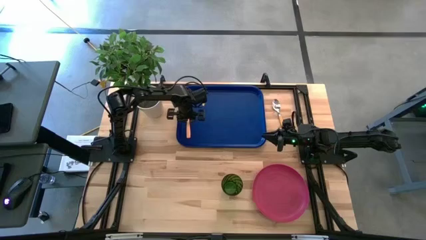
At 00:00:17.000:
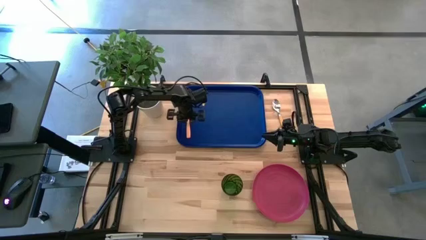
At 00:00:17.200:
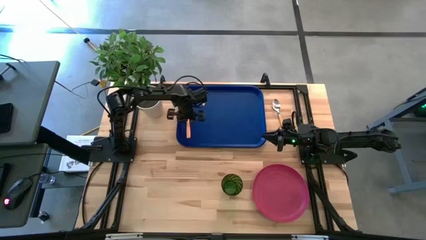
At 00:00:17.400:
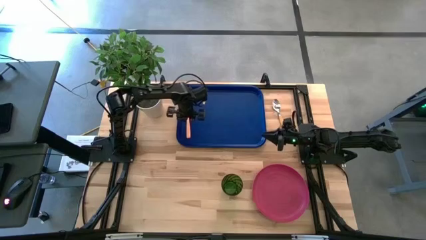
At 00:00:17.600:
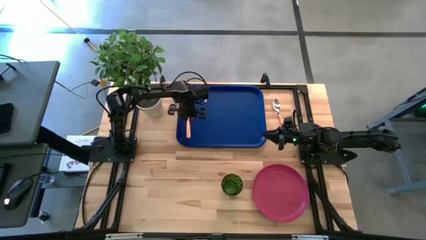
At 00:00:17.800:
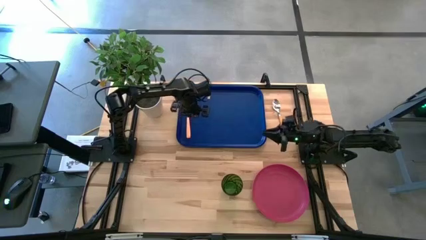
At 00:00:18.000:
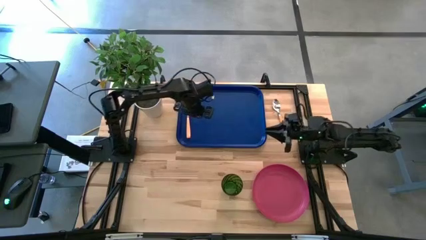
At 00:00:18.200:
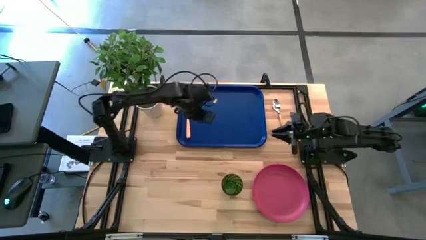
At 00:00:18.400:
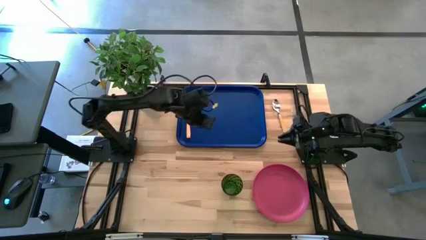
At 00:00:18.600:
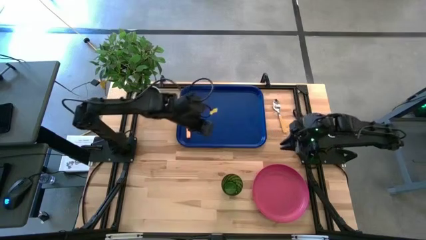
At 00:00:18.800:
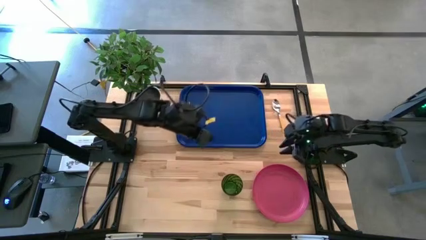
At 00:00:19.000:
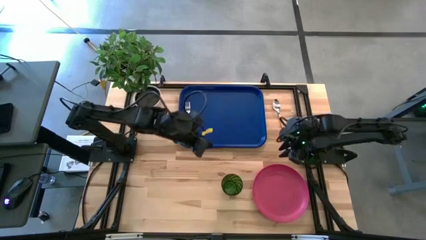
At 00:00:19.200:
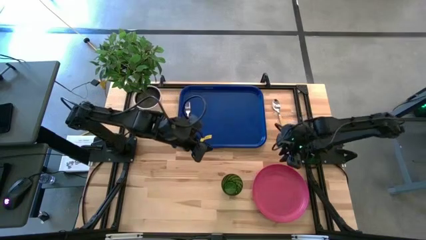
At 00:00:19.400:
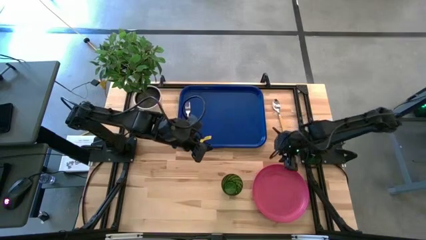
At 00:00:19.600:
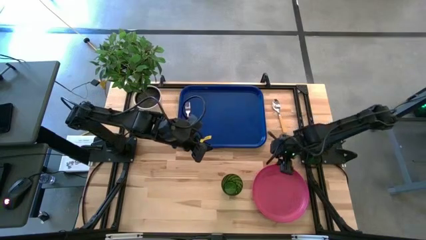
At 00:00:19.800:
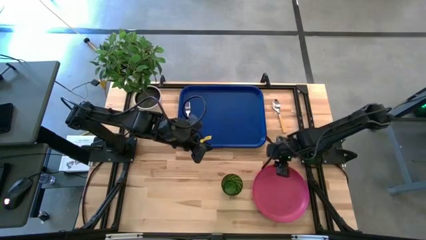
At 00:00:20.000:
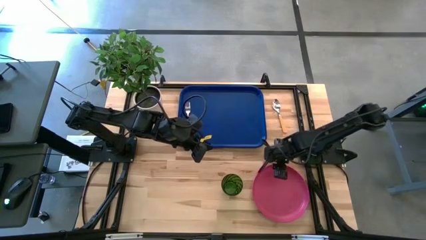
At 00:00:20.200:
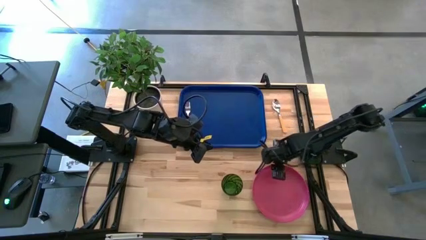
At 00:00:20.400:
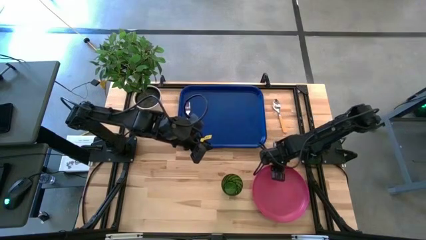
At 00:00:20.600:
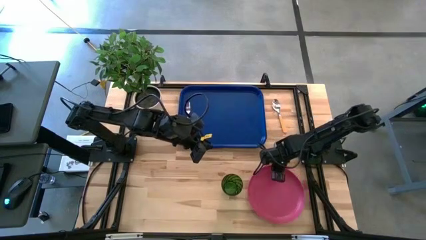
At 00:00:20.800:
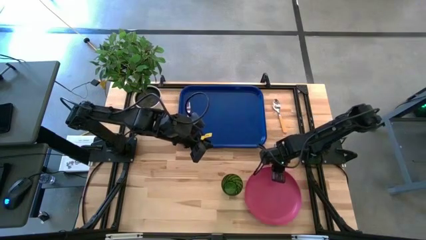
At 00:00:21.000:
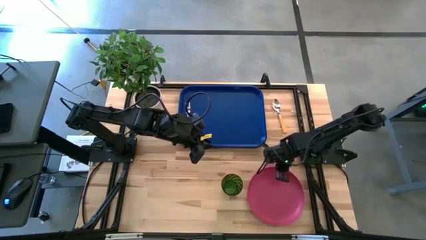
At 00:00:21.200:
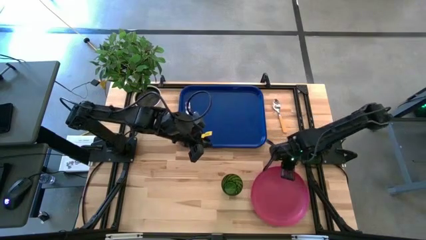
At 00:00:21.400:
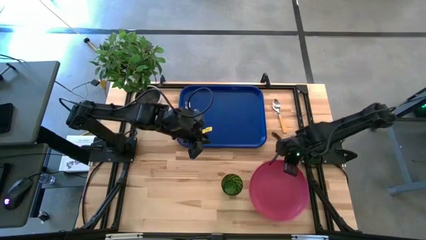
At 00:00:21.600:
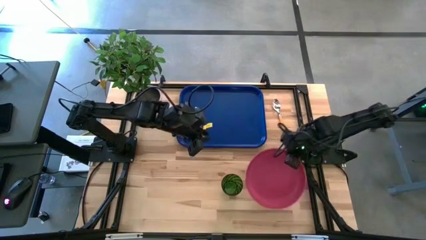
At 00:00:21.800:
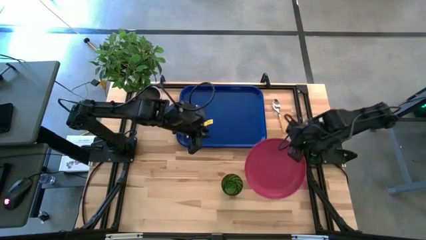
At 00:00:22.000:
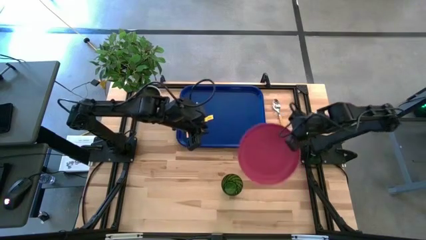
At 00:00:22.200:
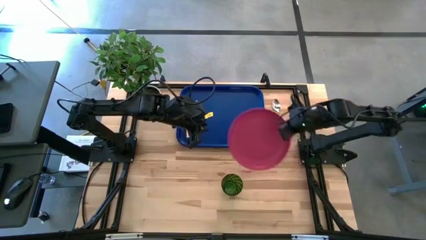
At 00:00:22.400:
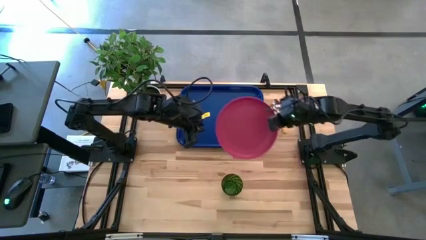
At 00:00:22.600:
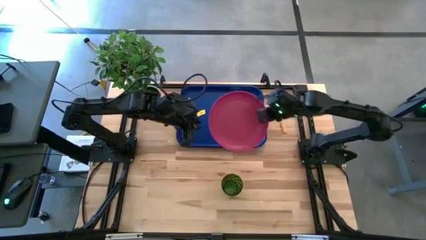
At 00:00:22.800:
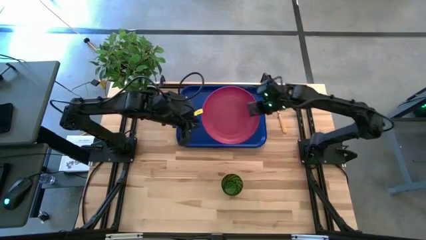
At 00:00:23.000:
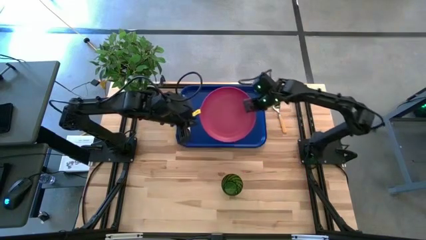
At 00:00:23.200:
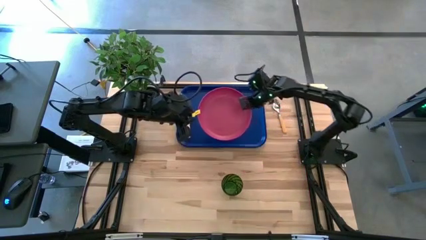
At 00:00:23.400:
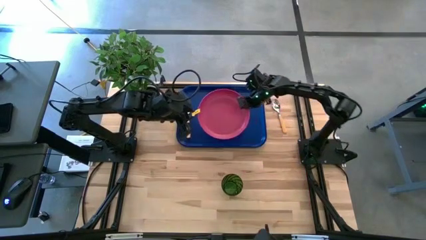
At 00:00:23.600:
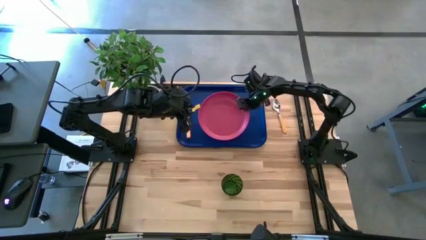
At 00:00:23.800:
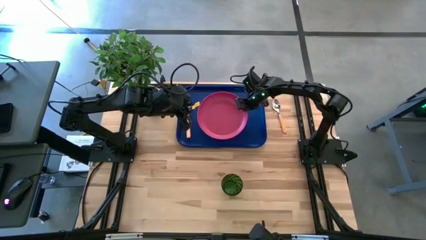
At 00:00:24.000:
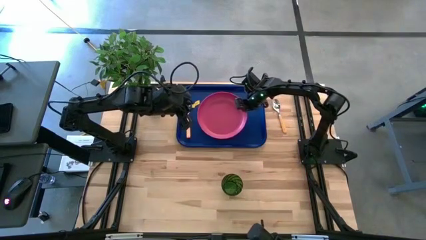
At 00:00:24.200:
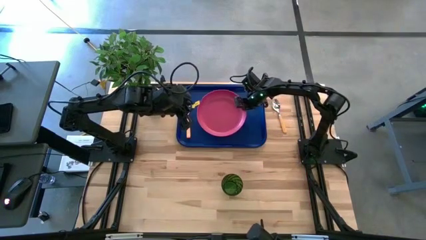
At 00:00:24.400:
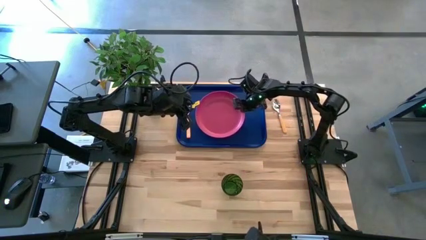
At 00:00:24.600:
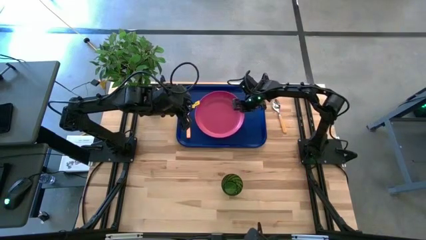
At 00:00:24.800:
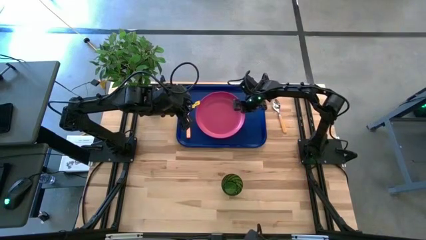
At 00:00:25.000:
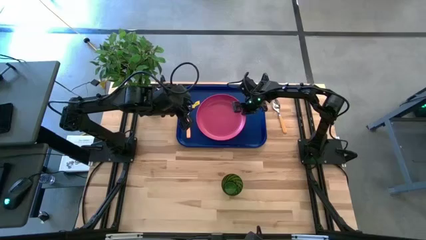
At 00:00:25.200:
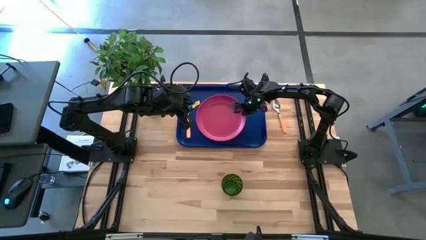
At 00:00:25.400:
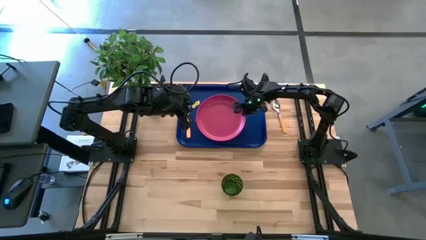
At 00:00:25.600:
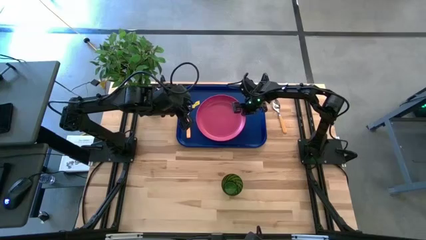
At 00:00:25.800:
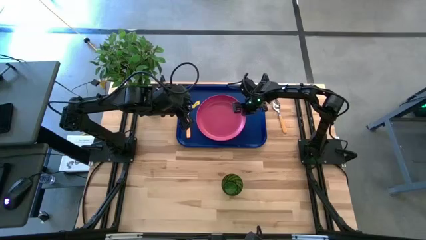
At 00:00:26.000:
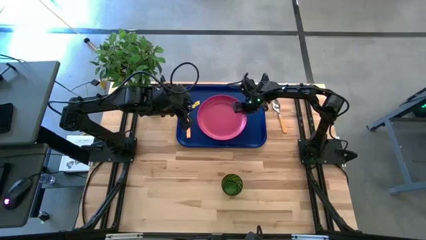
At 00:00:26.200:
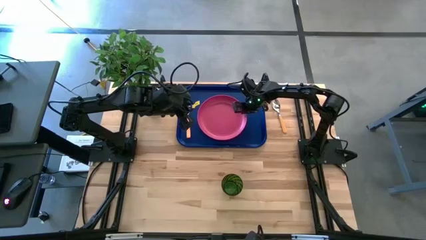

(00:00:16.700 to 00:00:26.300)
Task: Pick and place plate/cup/fork/spoon on tray
Put the pink plate on the blue serving tray

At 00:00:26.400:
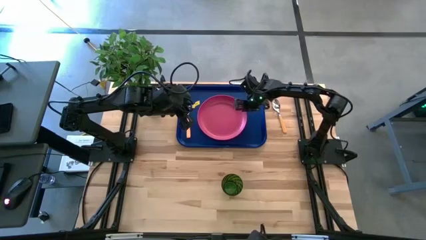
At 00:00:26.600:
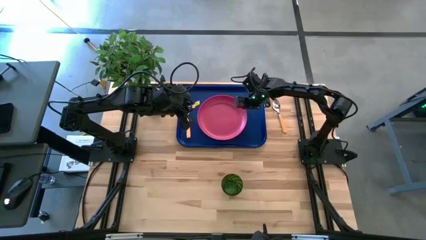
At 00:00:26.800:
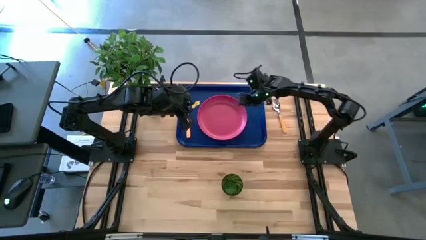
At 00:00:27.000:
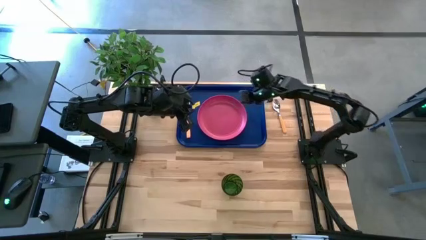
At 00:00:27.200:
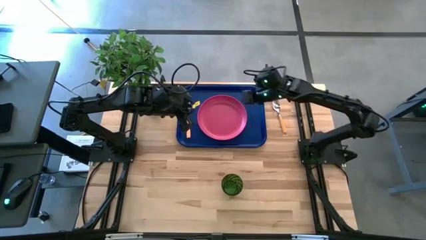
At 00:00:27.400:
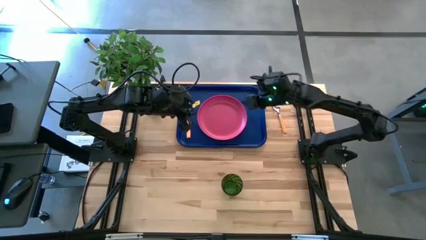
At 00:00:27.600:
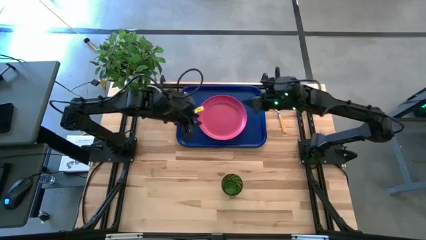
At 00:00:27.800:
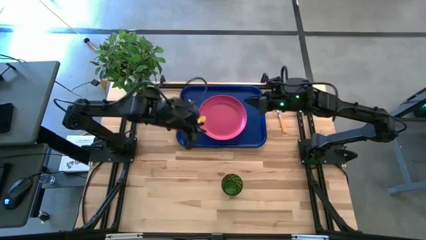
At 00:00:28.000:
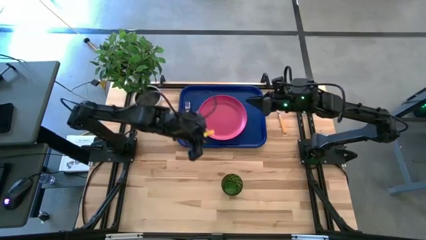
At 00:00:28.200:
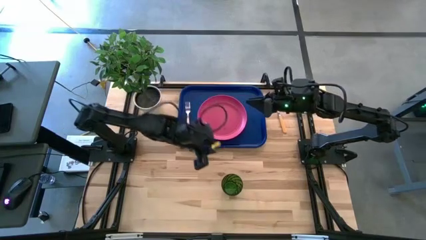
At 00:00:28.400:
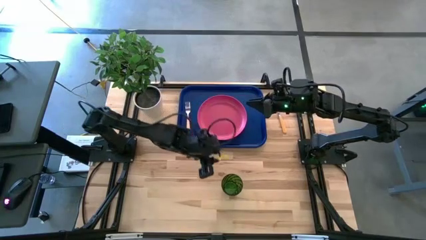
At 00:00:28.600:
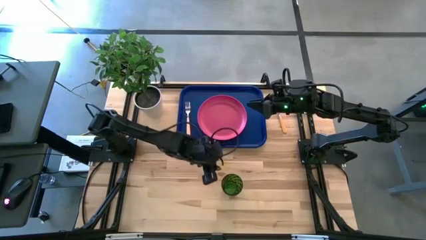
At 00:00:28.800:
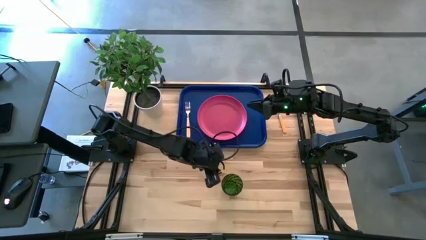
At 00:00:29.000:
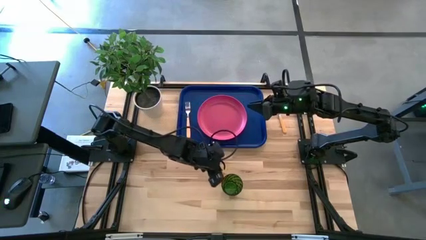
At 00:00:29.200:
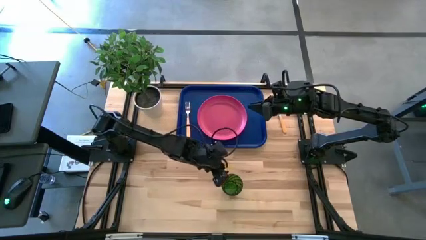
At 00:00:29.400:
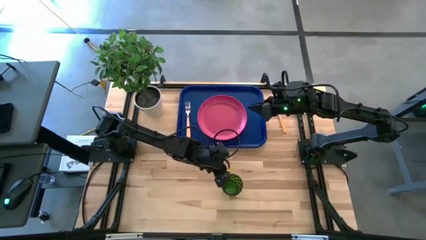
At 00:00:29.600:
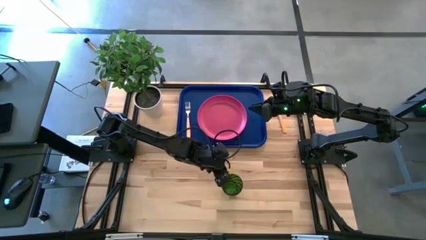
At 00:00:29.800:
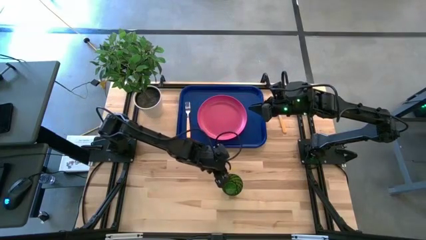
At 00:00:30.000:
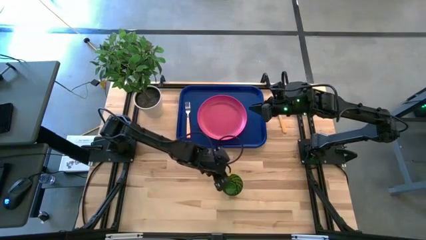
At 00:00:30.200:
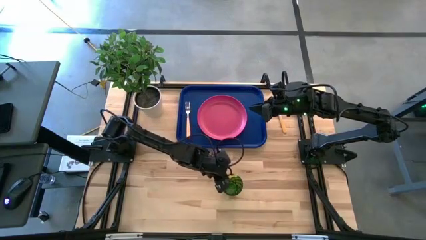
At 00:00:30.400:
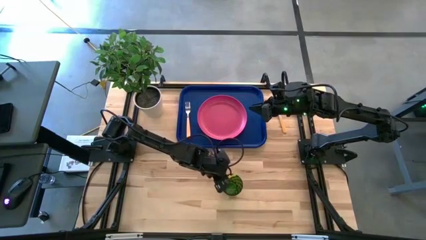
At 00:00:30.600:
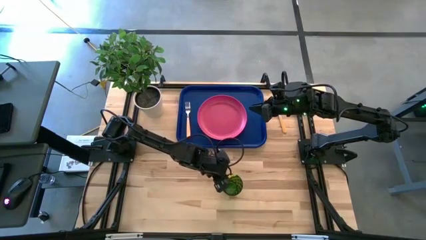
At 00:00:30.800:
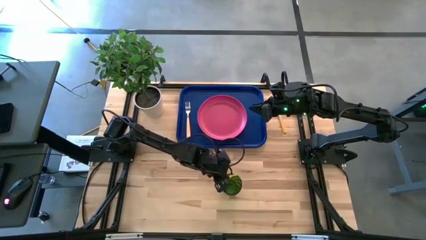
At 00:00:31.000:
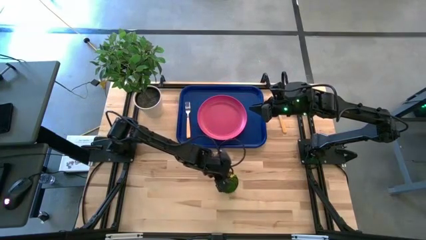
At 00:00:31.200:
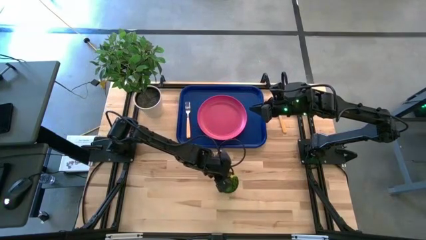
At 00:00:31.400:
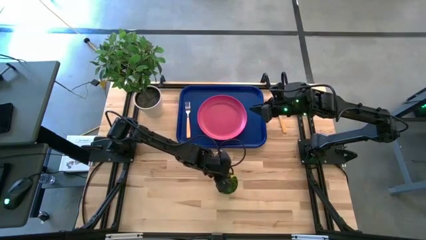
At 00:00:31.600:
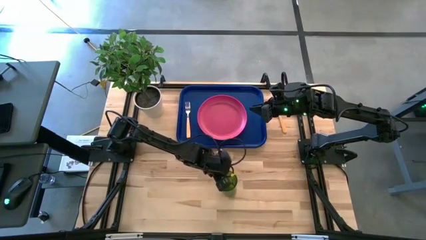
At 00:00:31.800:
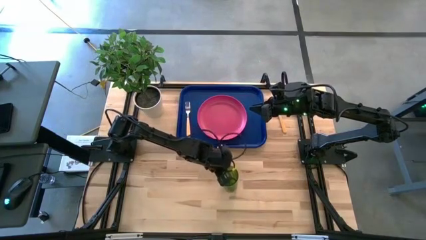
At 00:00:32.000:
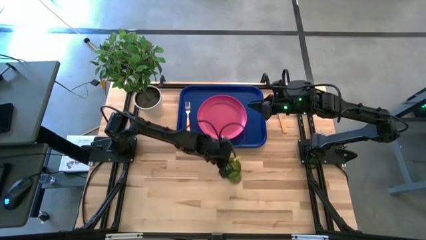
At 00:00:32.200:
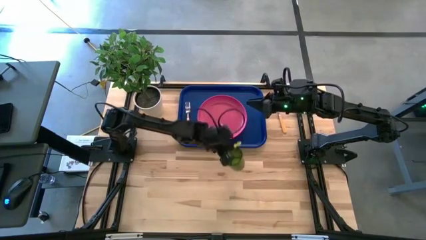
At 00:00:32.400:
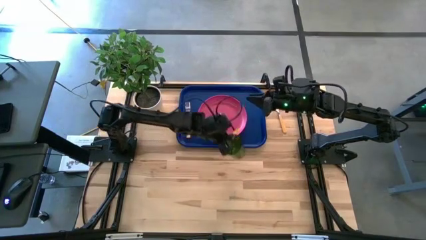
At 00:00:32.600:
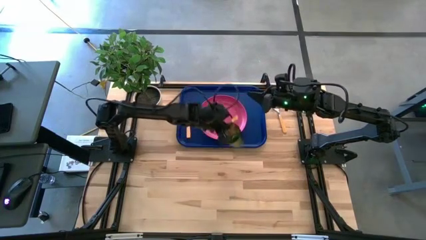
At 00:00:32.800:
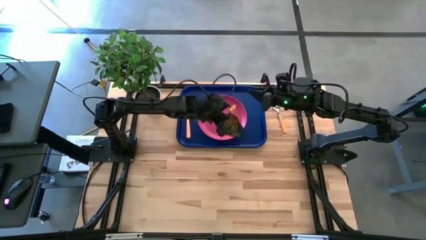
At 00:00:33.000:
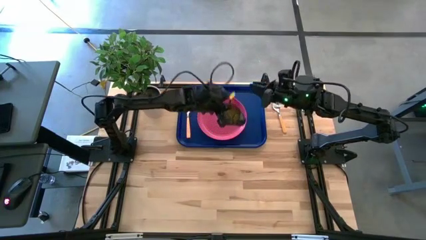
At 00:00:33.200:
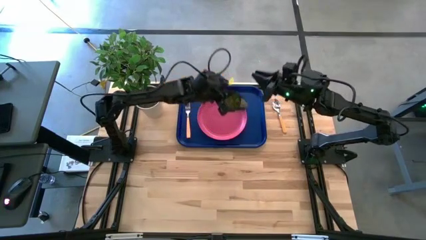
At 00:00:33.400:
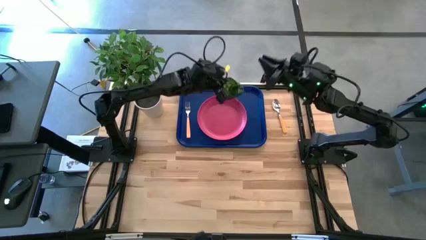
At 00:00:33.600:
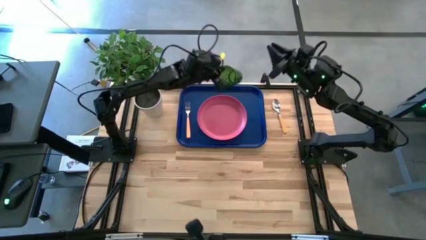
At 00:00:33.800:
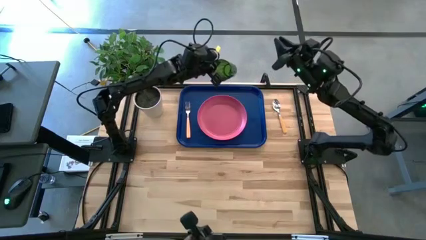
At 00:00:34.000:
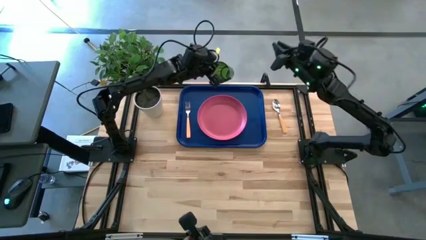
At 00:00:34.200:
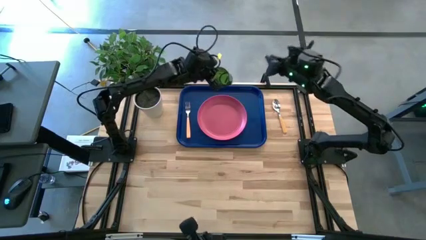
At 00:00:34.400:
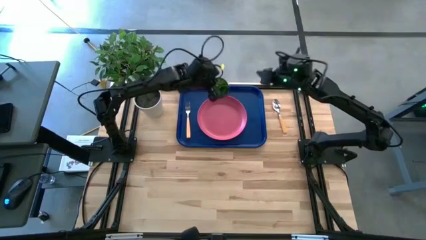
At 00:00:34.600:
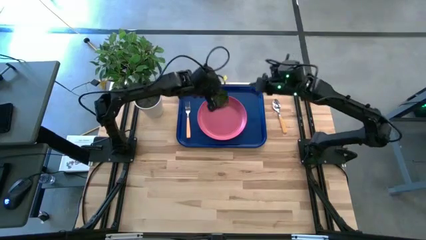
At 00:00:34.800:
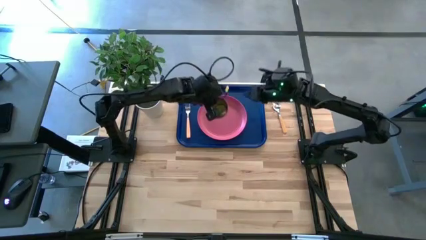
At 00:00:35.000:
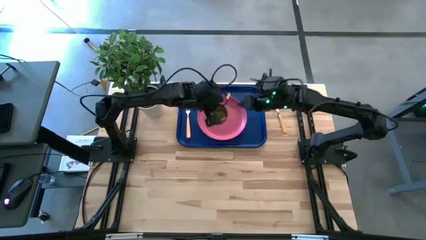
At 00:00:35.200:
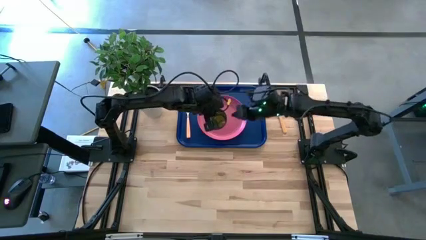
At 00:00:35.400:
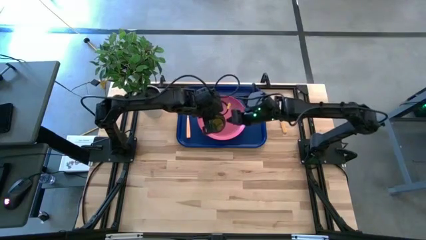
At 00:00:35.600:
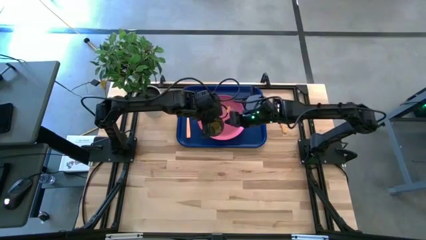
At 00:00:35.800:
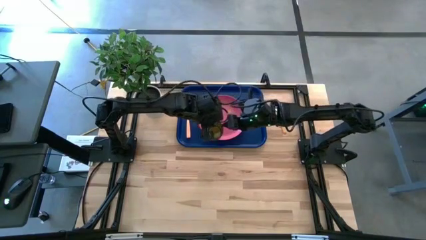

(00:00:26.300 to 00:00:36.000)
Put the green cup on the blue serving tray
